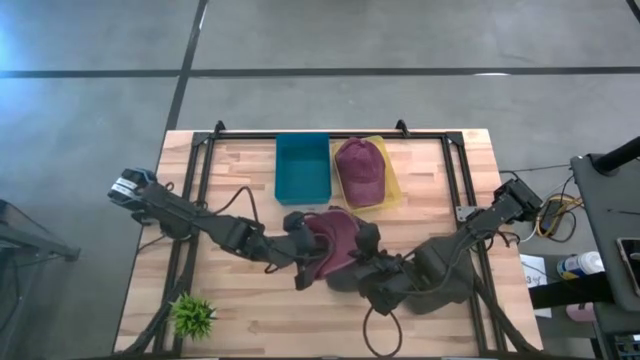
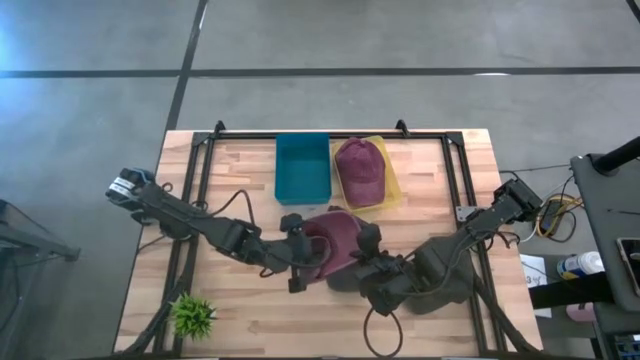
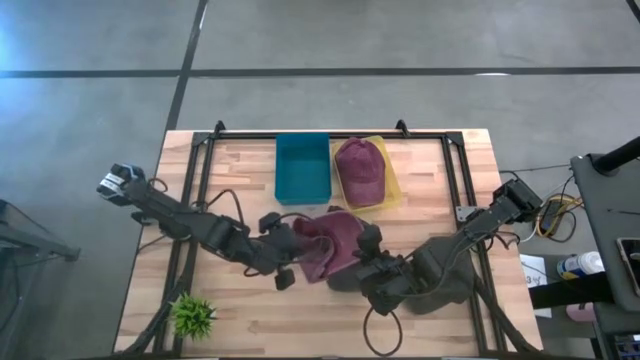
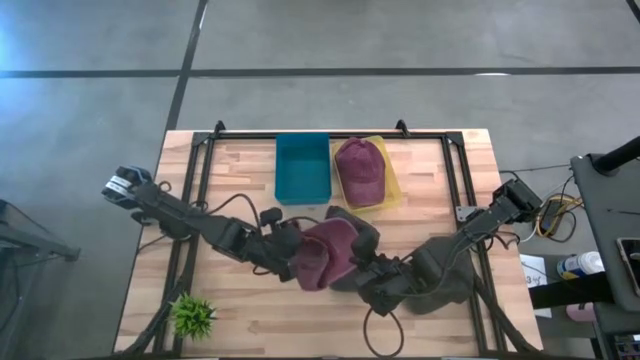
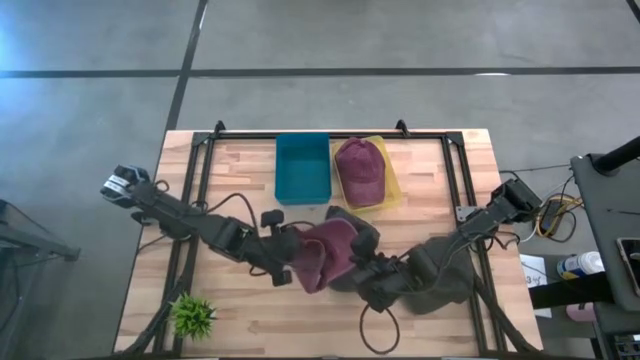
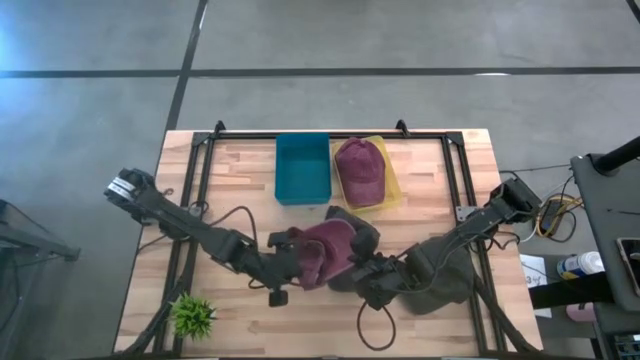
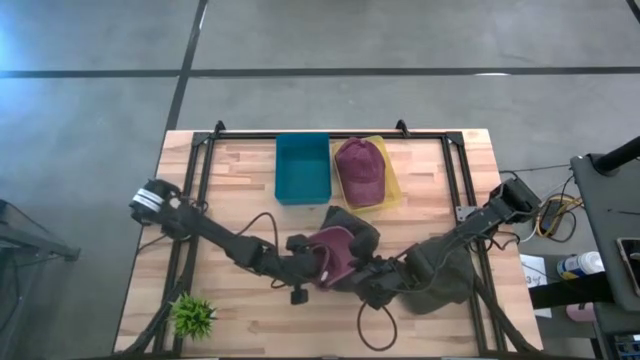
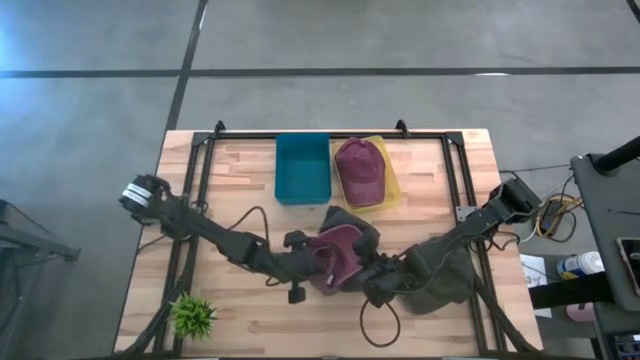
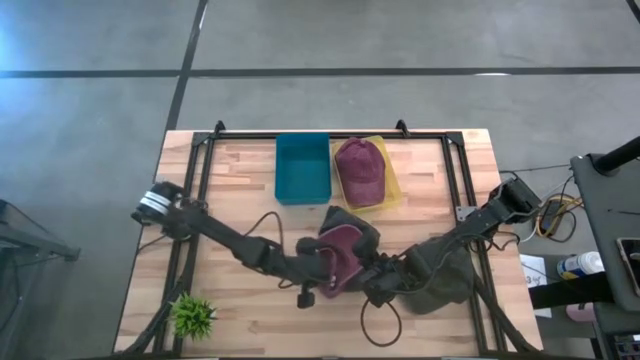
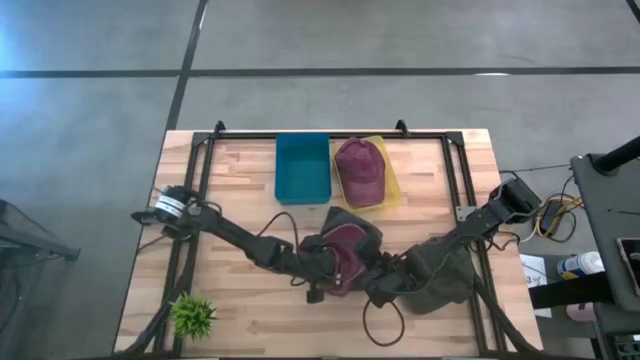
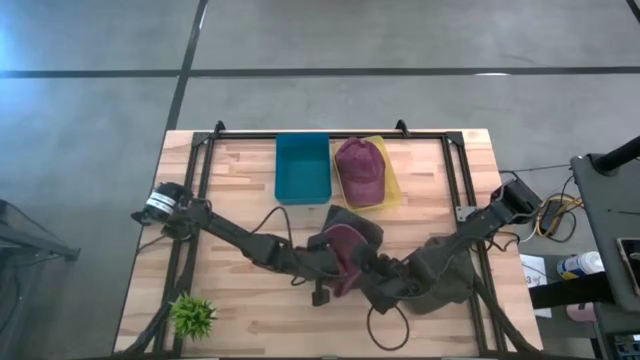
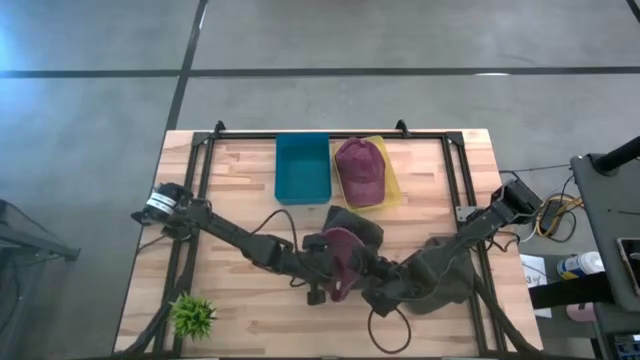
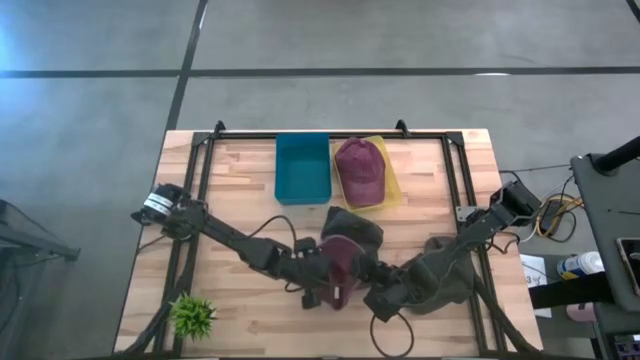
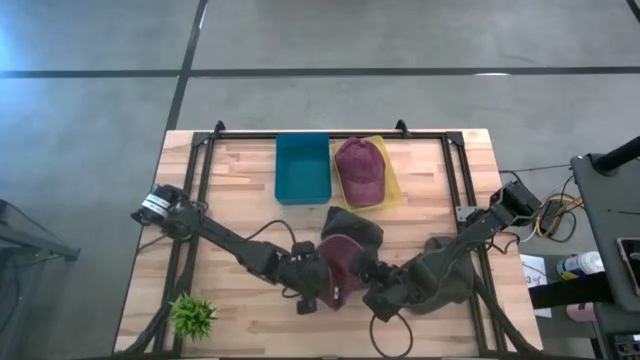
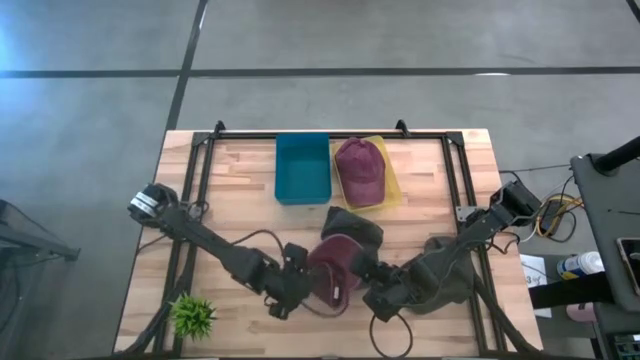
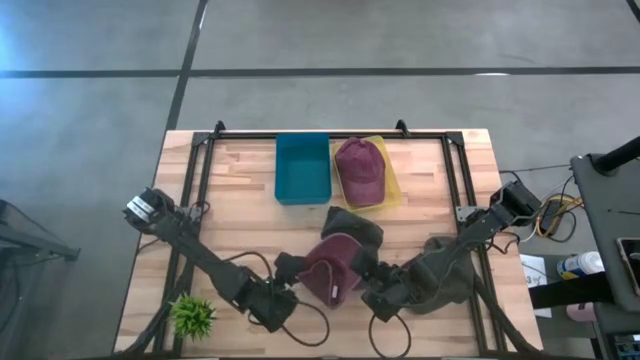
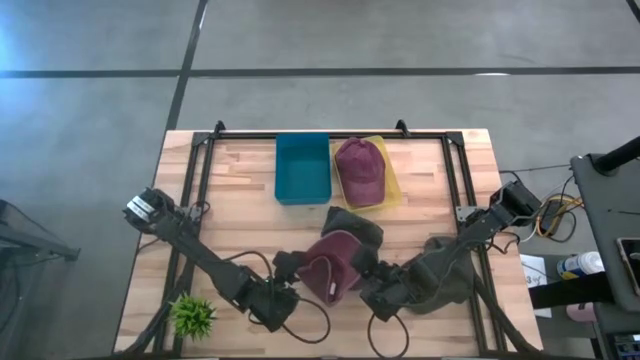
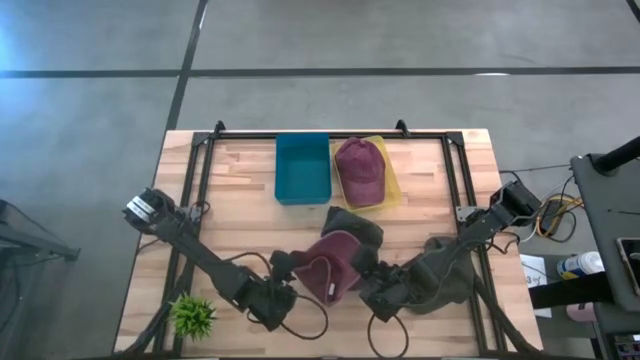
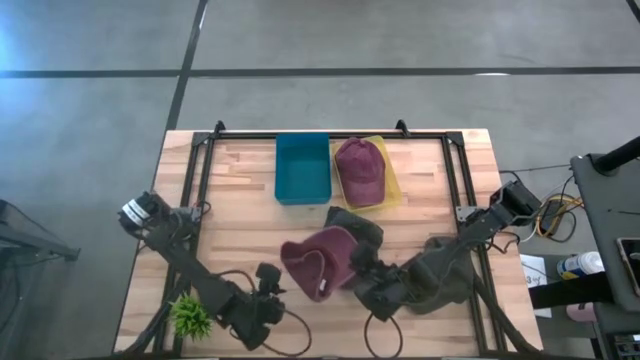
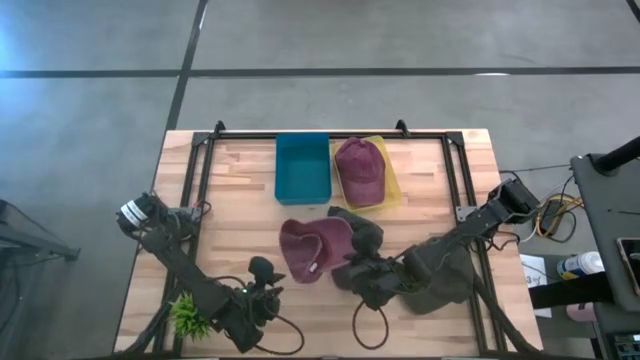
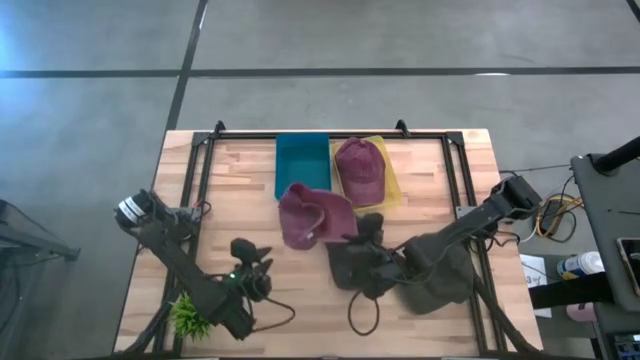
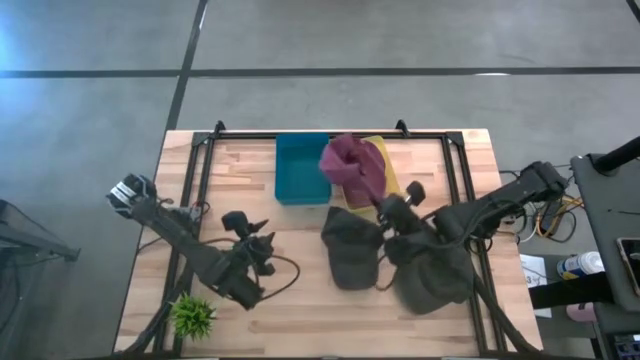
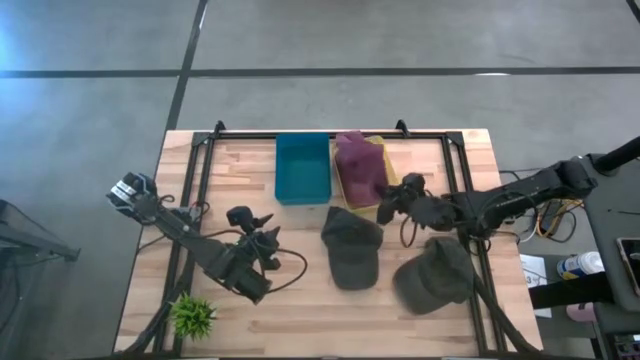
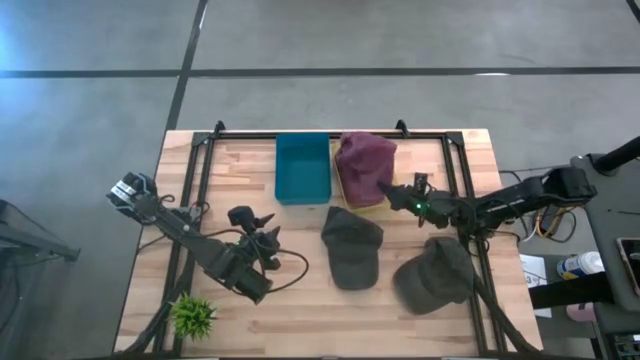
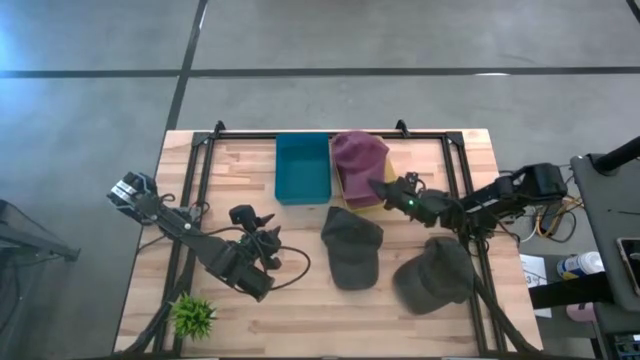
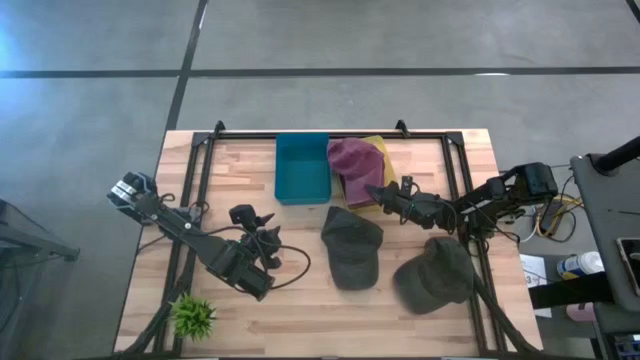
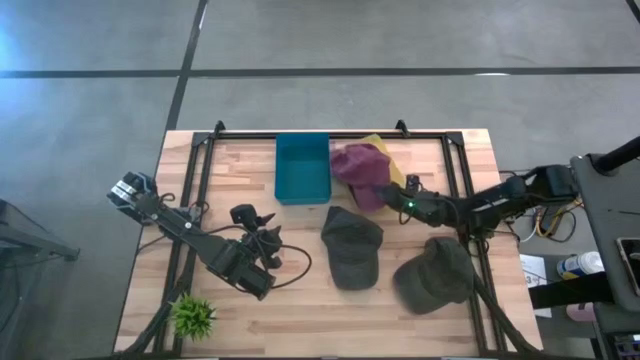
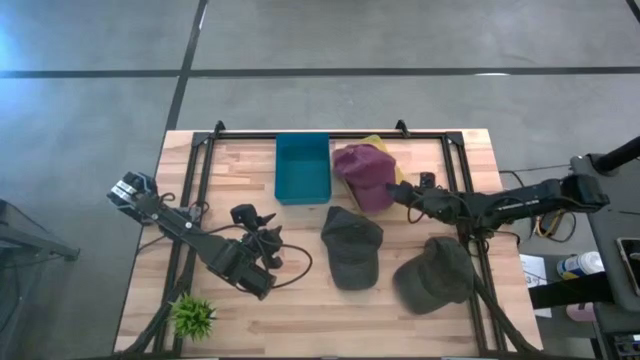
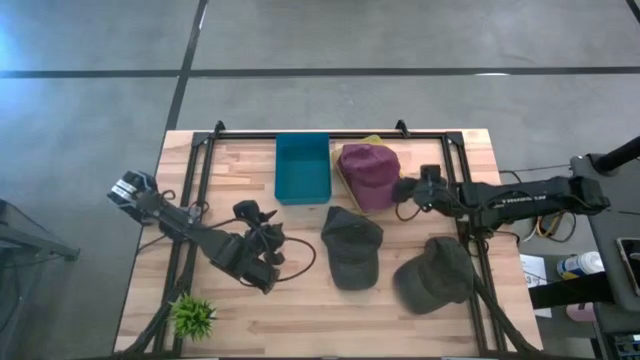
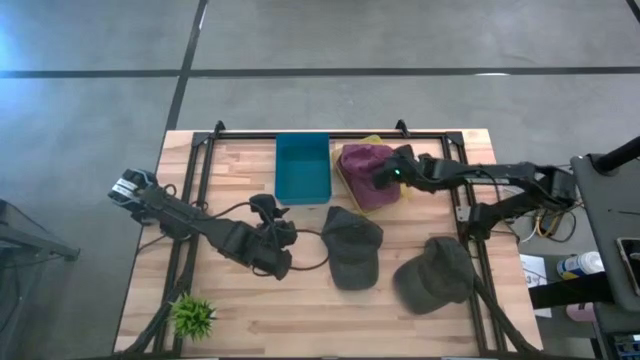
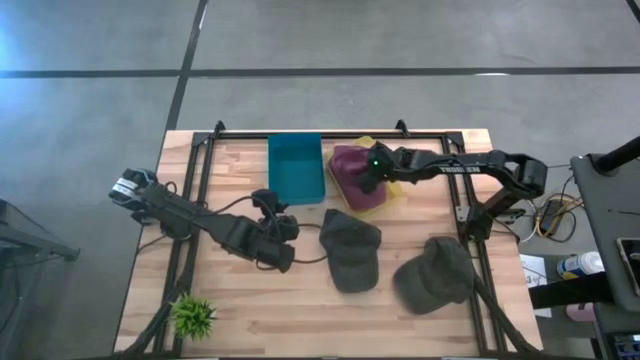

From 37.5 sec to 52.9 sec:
Task: Pick & Place hat
Put the red cap into the yellow bin
